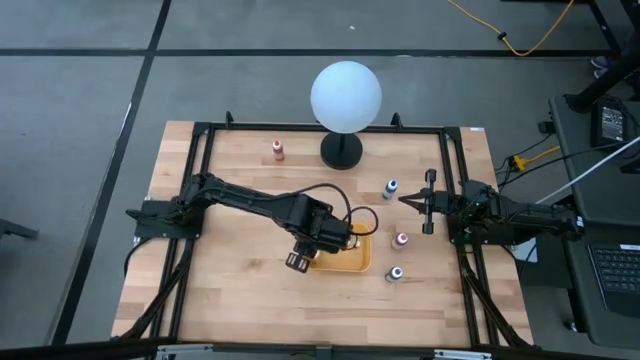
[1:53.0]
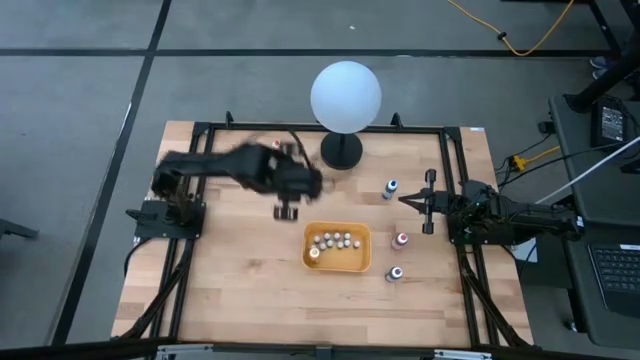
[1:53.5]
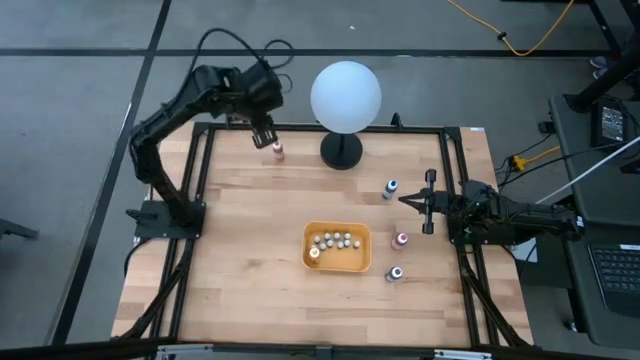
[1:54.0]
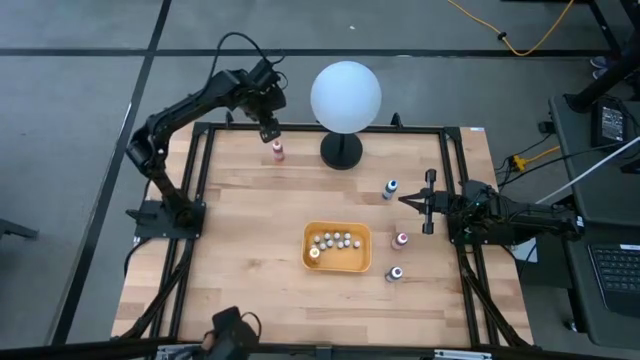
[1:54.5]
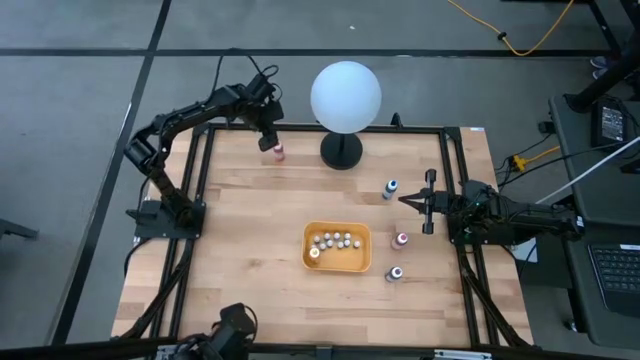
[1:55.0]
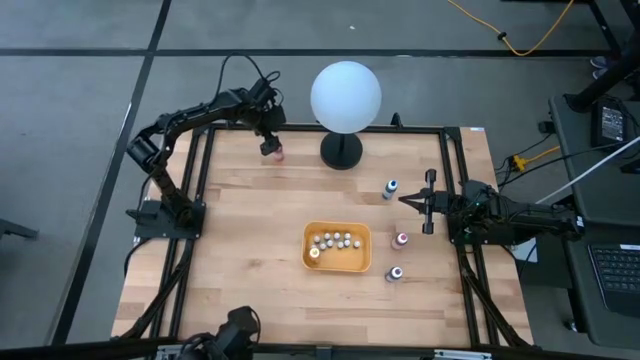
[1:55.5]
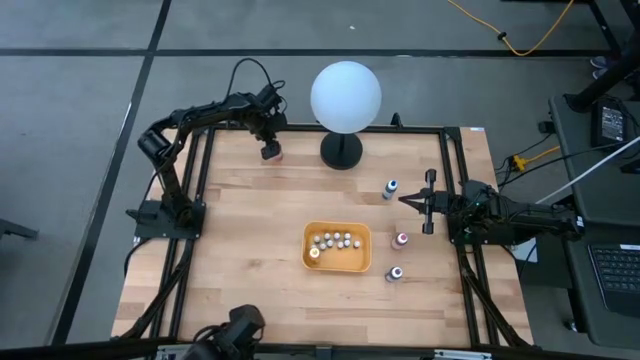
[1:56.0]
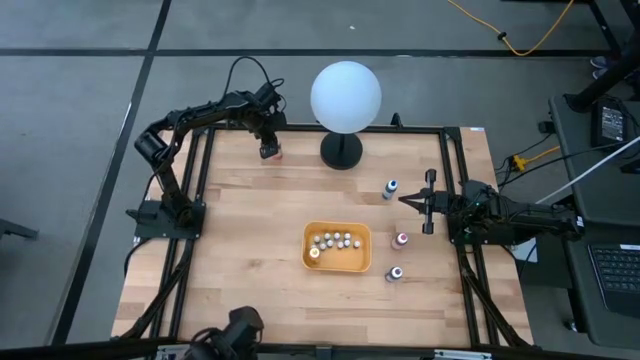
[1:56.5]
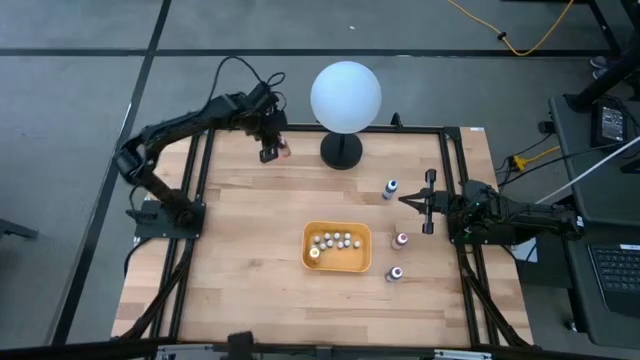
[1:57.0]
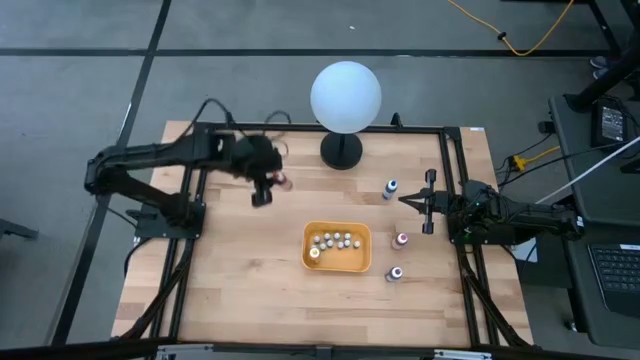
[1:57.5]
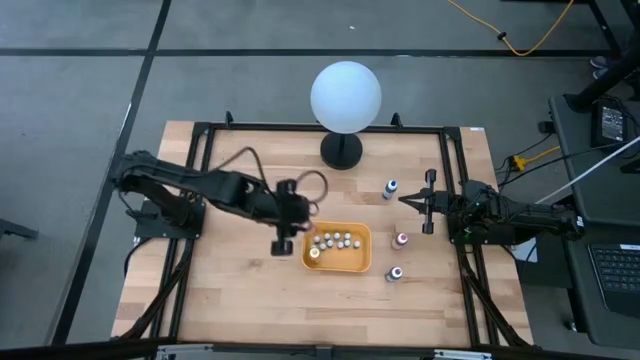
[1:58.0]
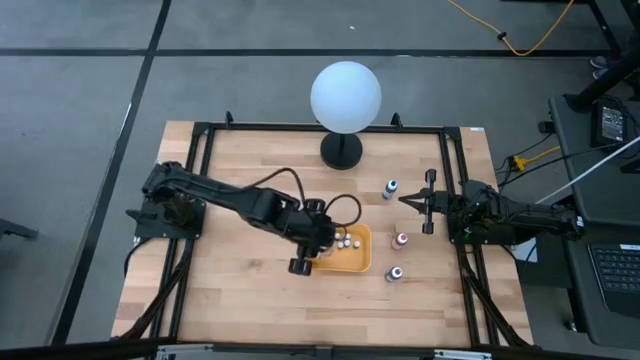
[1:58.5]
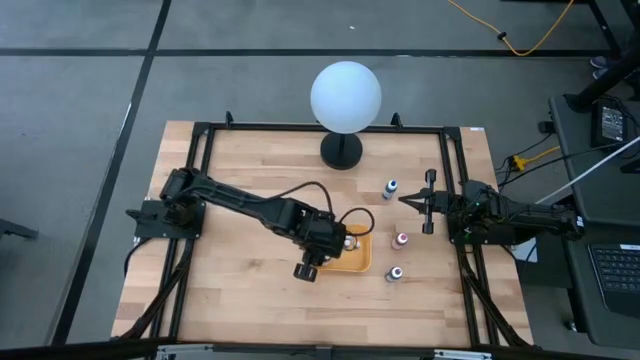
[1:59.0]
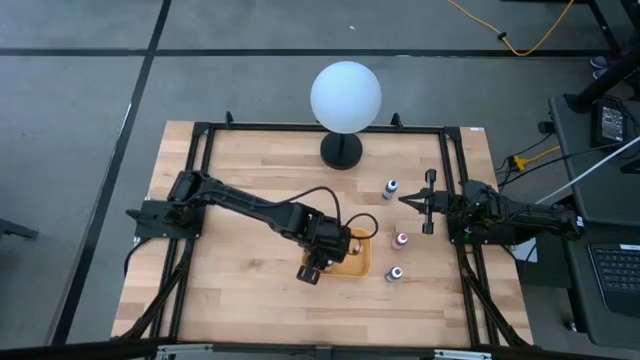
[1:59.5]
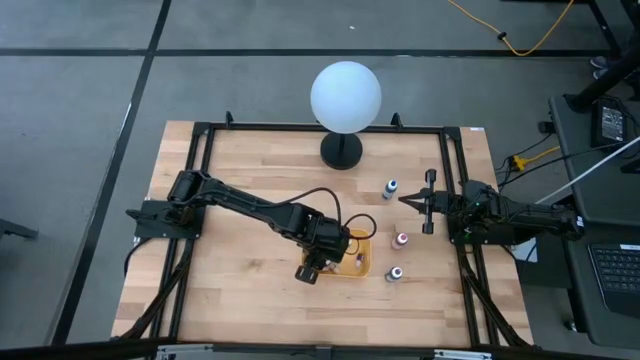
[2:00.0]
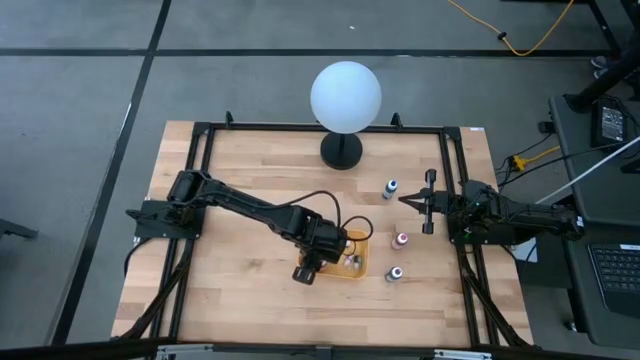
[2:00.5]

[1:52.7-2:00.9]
Task: Pick & Place food coloring
Put the large orange food coloring bottle into the yellow bin

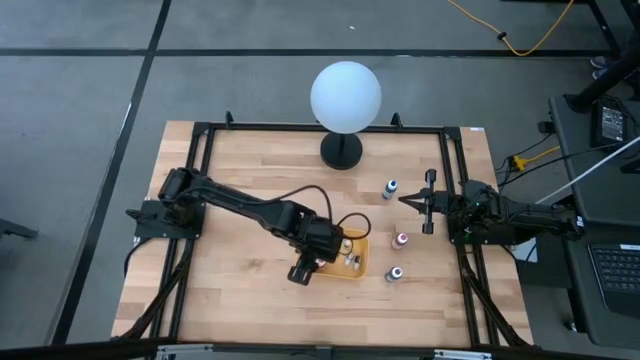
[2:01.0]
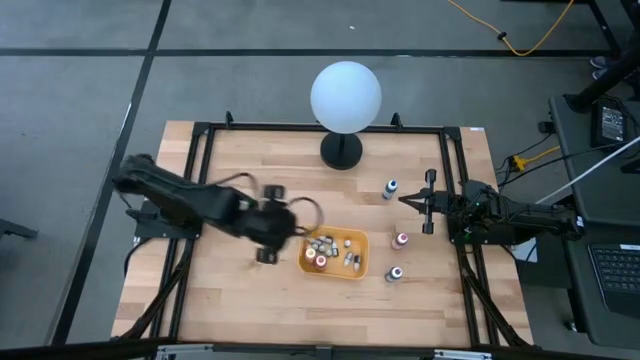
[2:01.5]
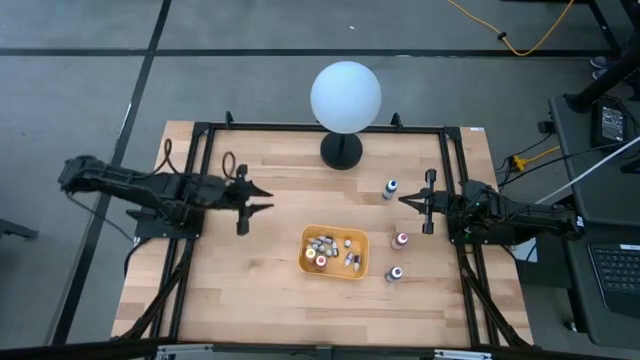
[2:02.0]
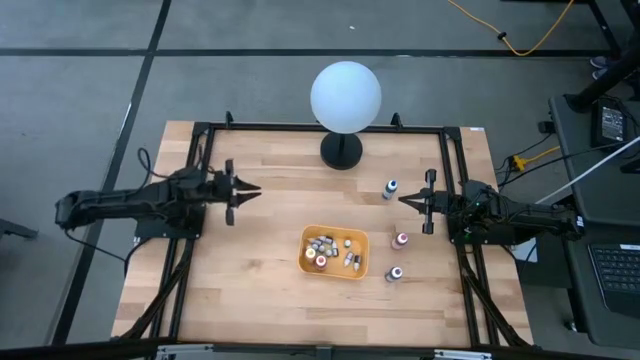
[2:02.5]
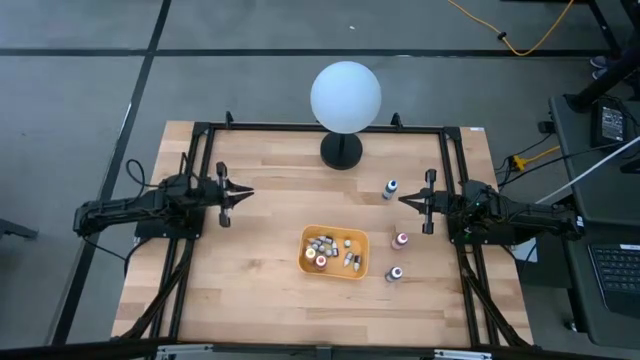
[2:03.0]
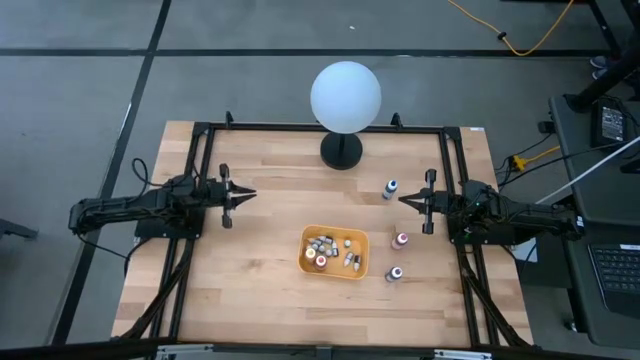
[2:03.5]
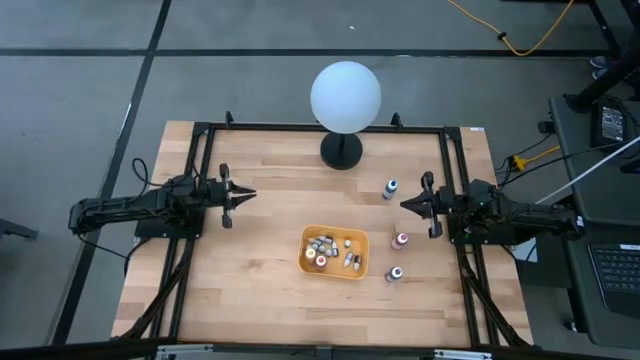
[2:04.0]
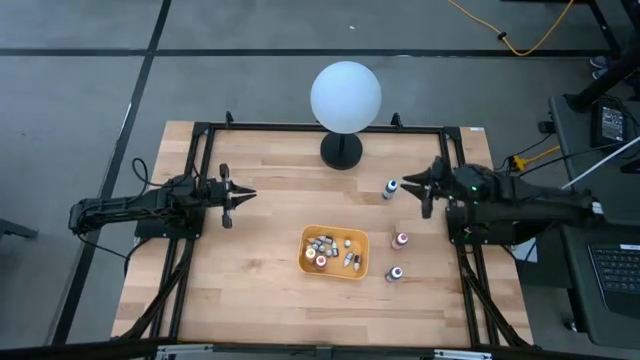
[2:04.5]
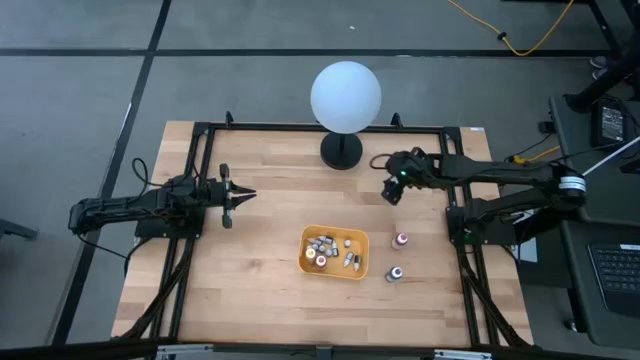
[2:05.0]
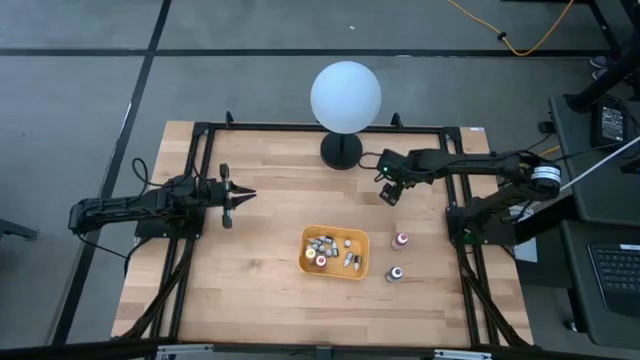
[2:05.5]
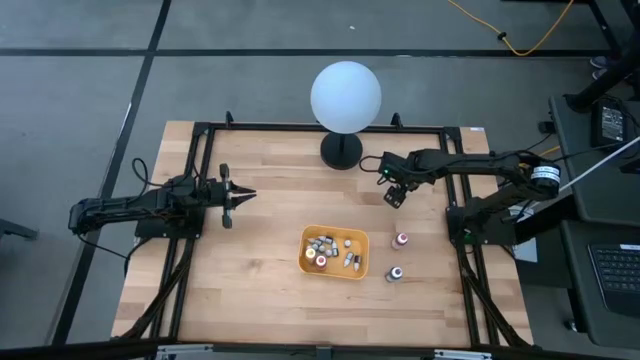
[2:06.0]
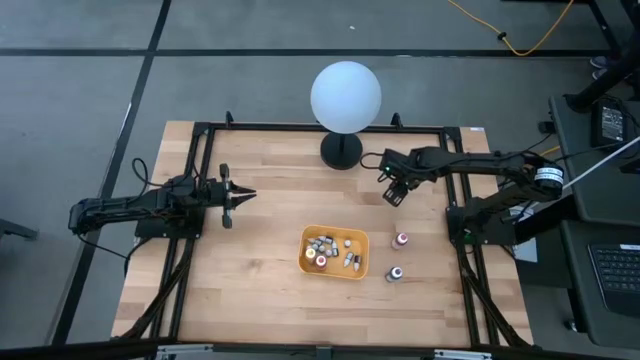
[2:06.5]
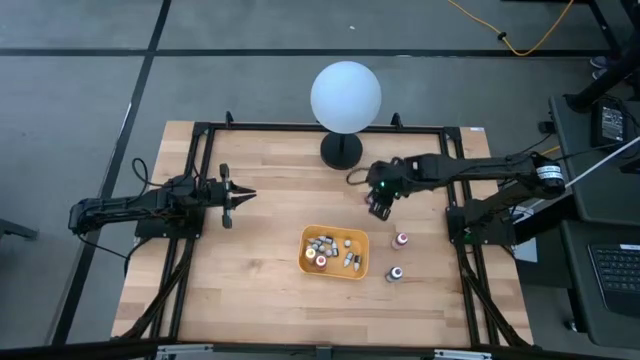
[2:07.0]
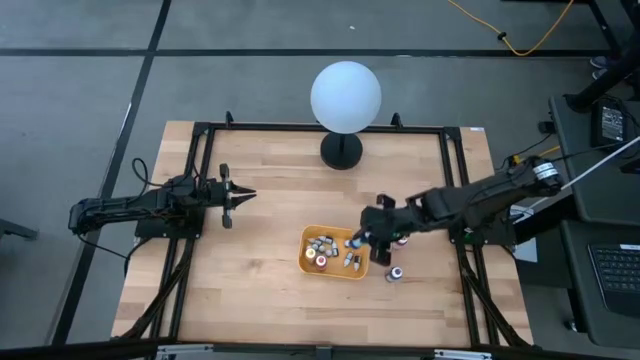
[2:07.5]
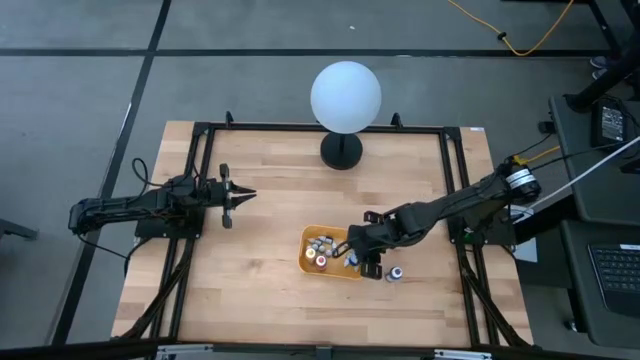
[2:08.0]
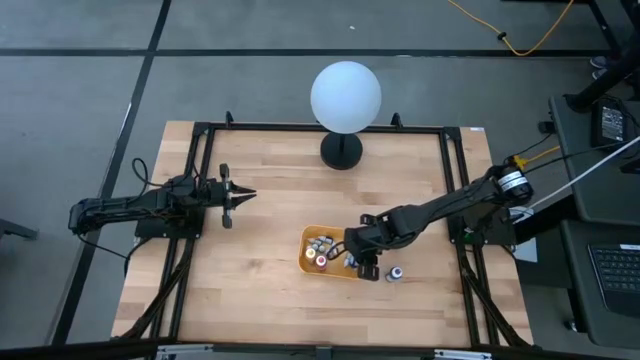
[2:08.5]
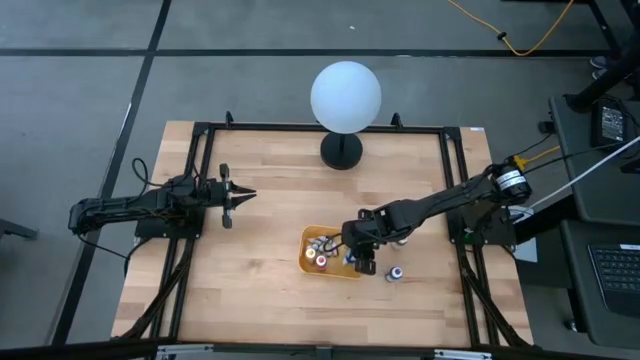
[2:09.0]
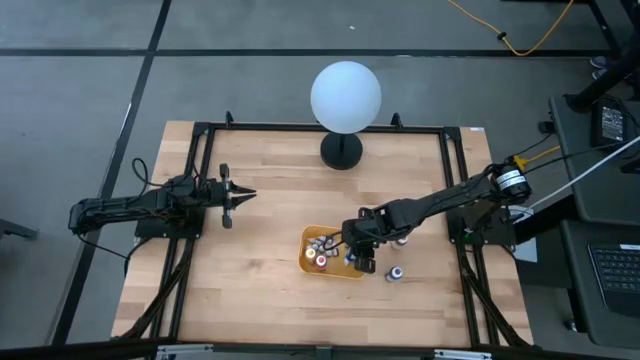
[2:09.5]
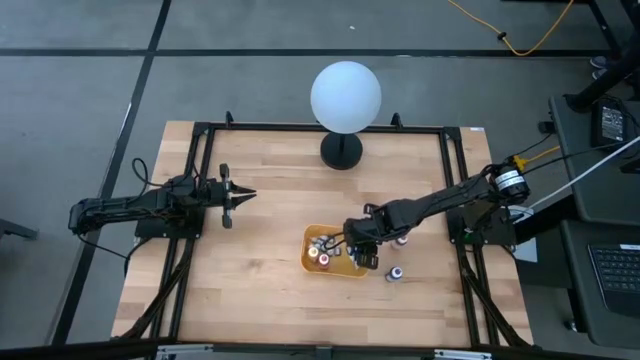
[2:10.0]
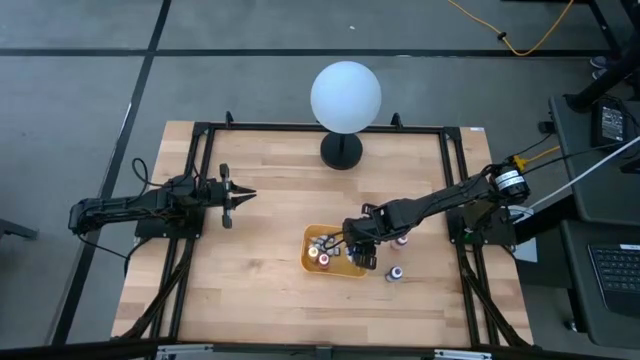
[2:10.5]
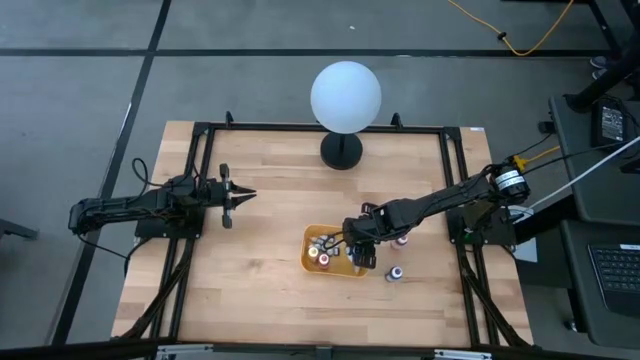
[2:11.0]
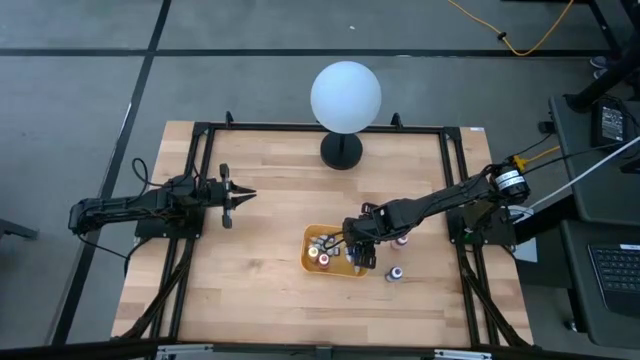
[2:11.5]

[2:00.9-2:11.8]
Put the large blue food coloring bottle into the yellow bin
